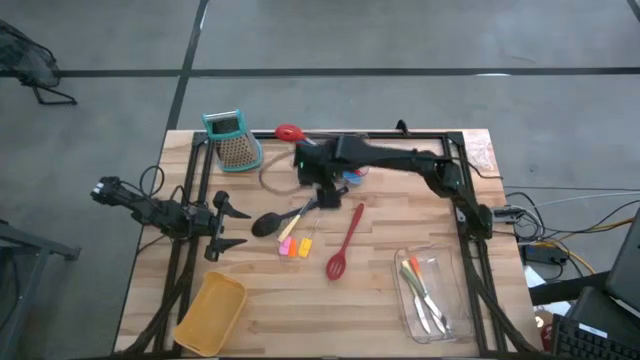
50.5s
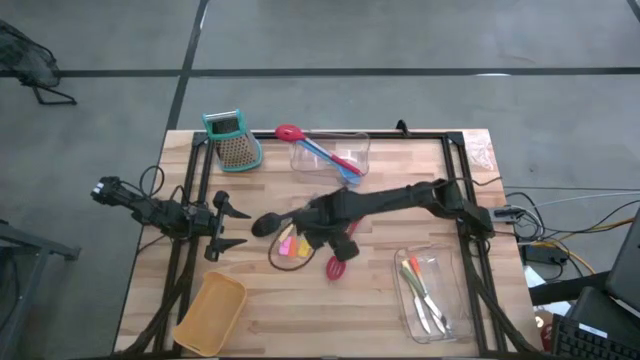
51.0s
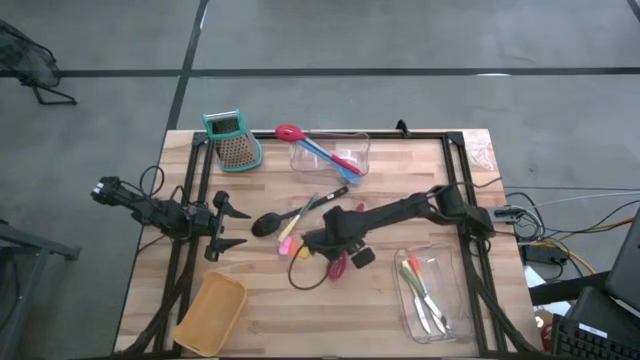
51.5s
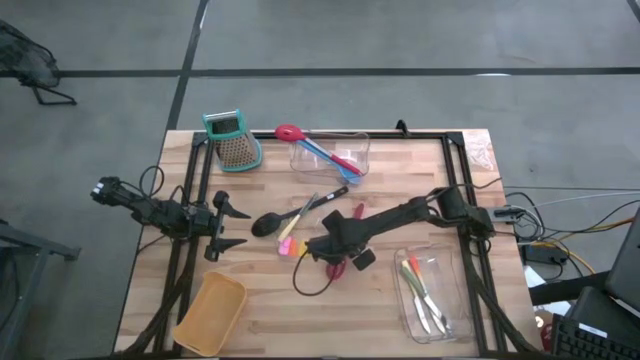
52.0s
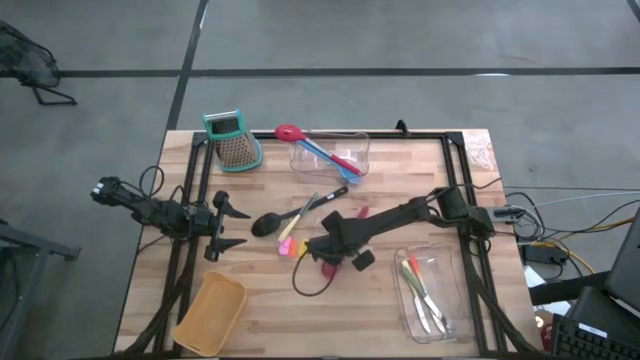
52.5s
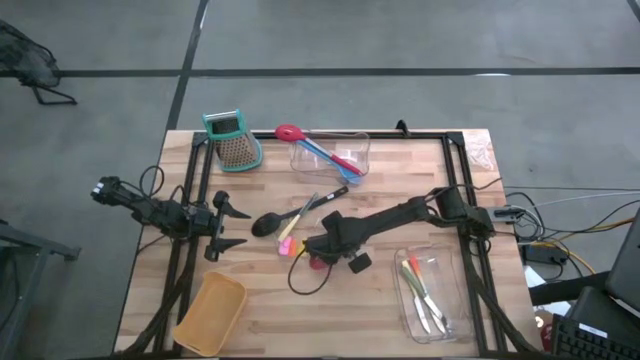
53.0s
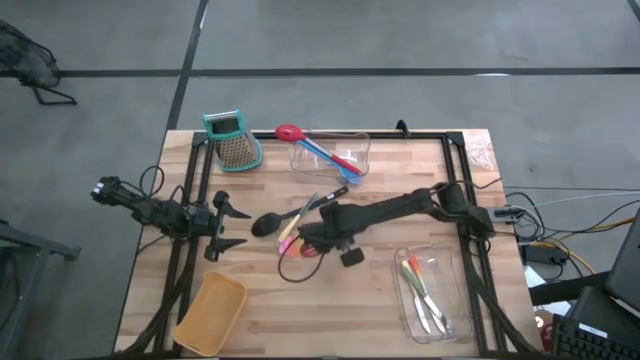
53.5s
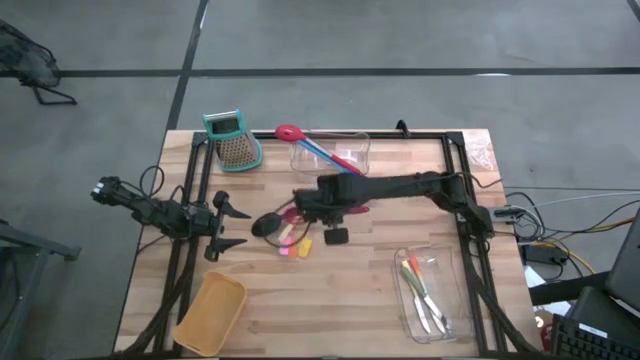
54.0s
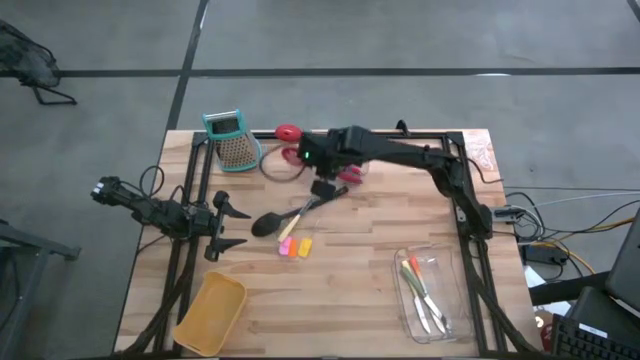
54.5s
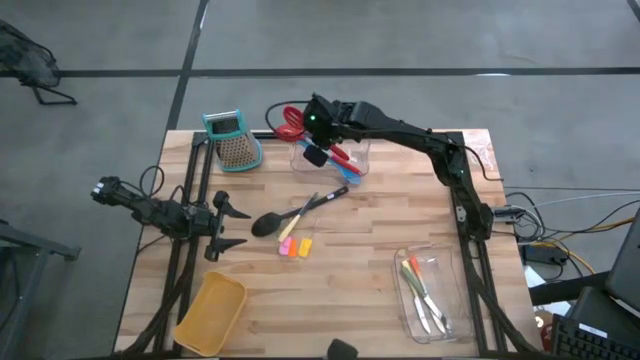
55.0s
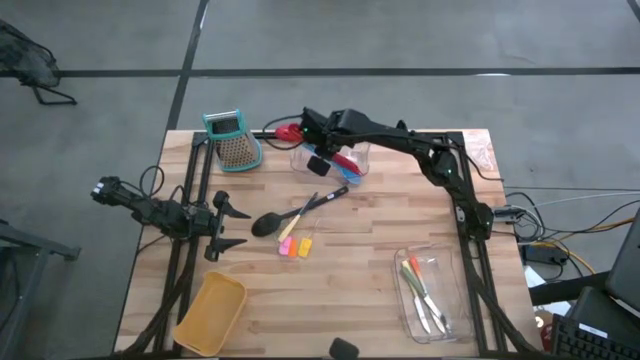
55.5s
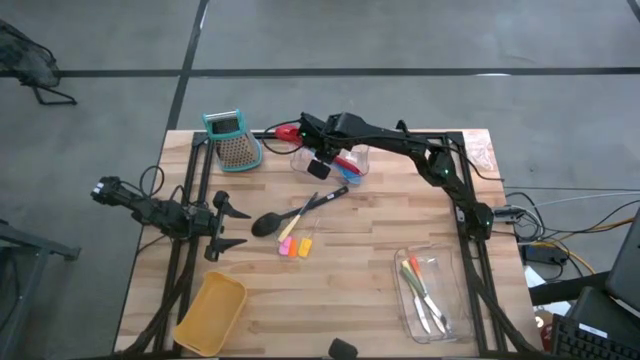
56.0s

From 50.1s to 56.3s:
Task: Pick & Place Kitchen Items
Put the red slotted spoon into the top transparent bin

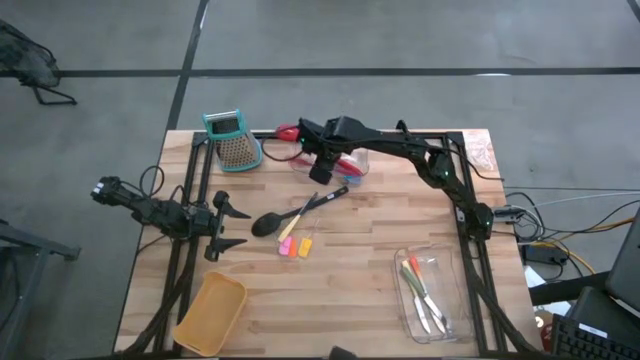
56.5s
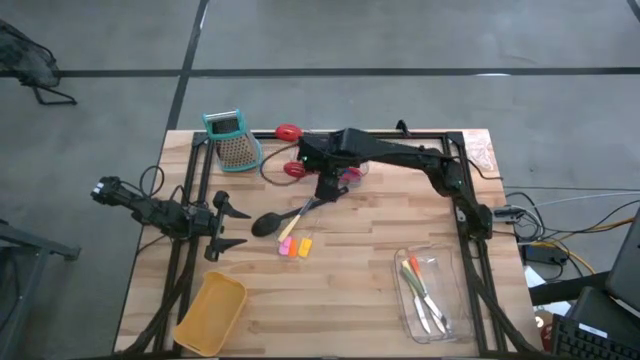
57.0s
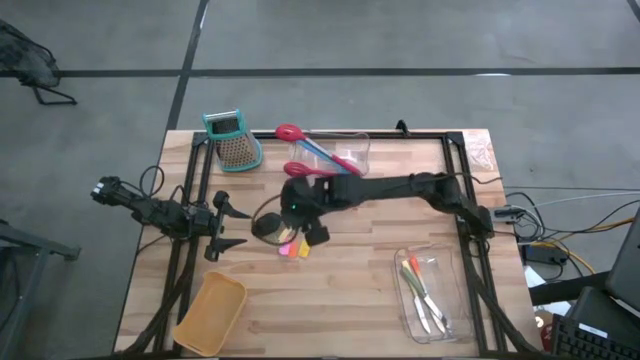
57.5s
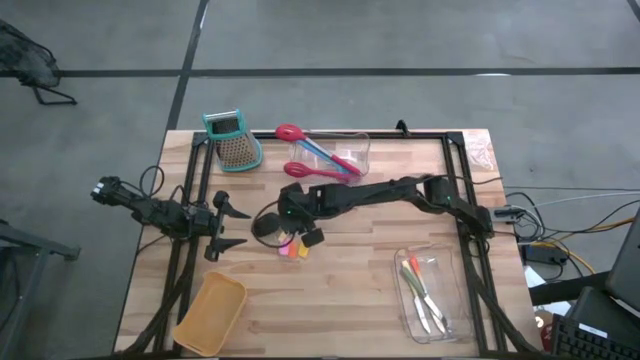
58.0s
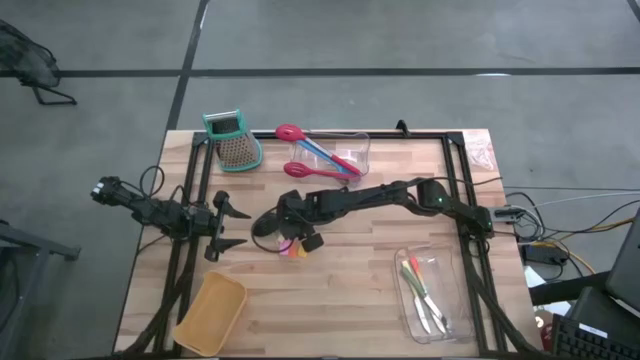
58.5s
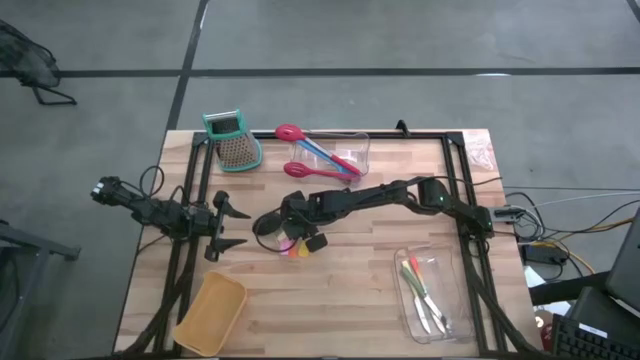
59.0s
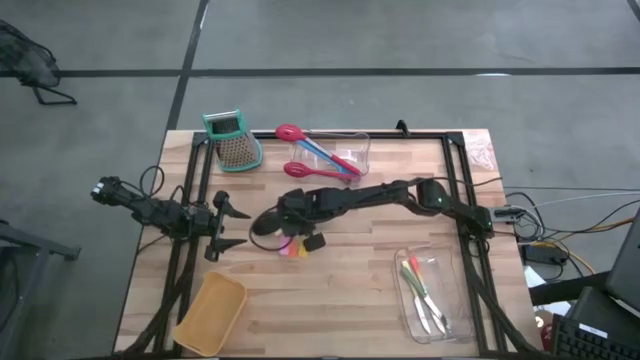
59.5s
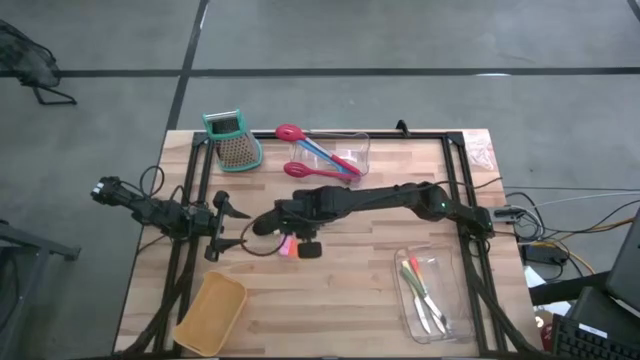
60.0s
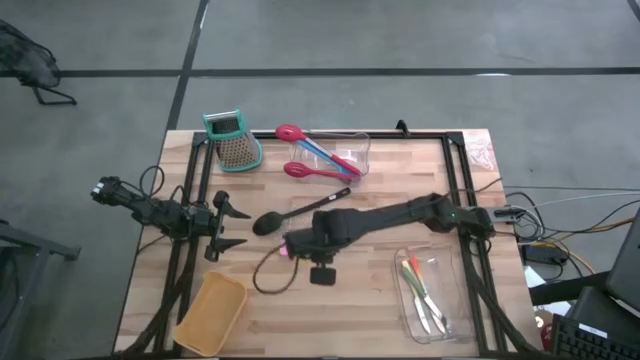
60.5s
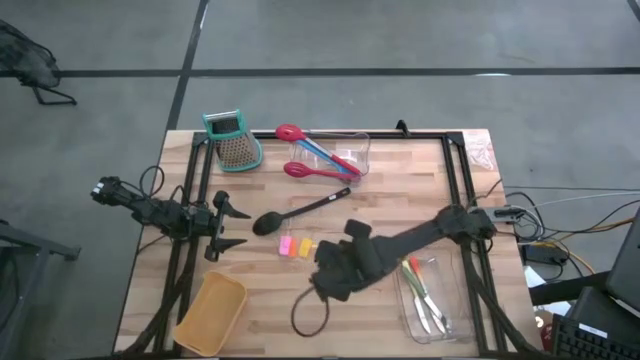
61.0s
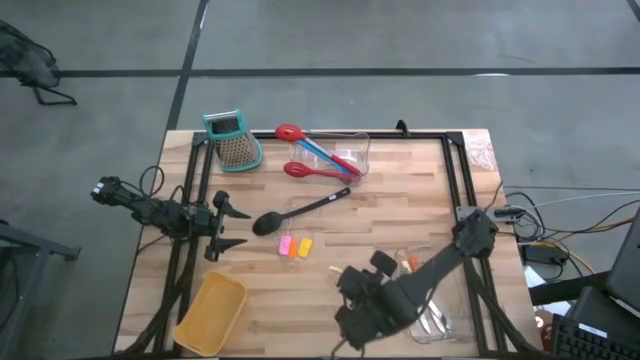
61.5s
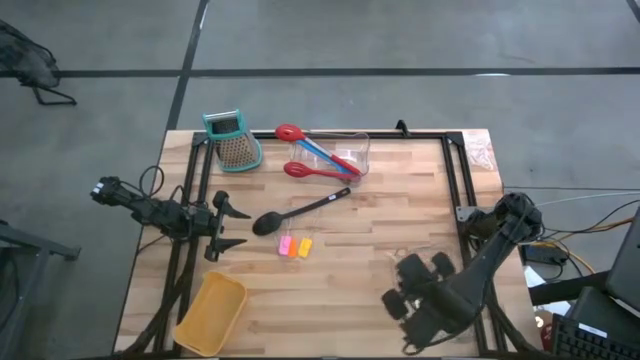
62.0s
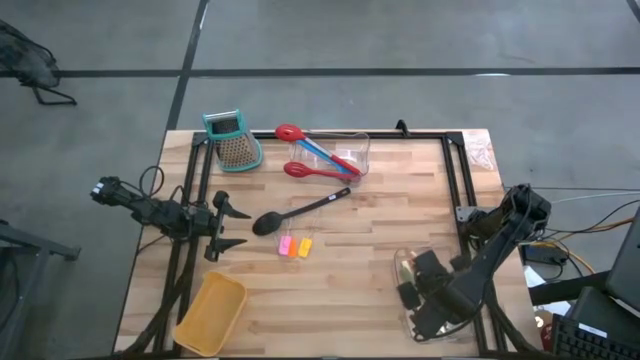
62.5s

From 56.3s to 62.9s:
Put the yellow knife into the bottom transparent bin

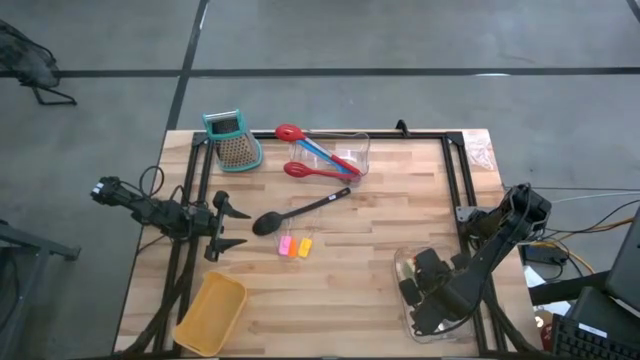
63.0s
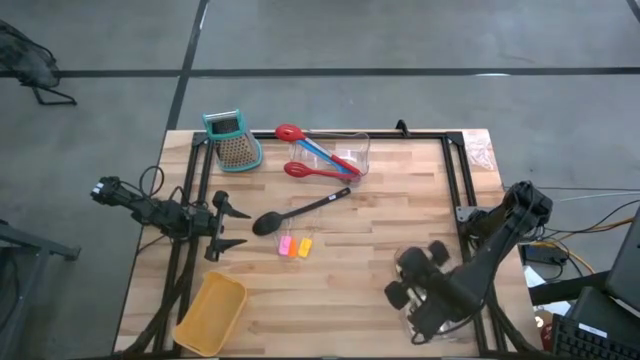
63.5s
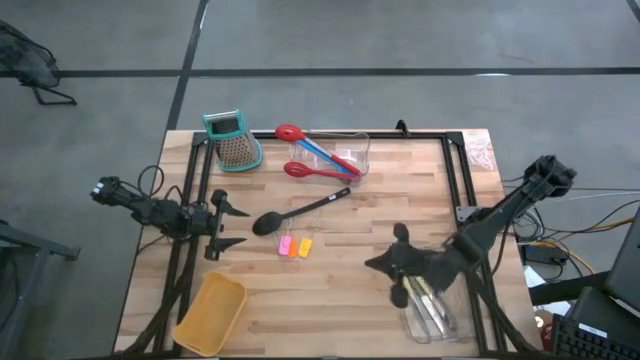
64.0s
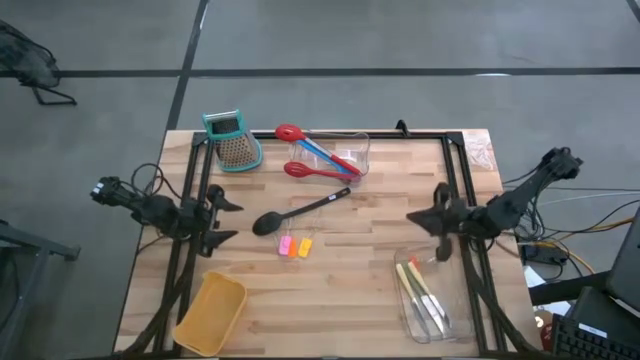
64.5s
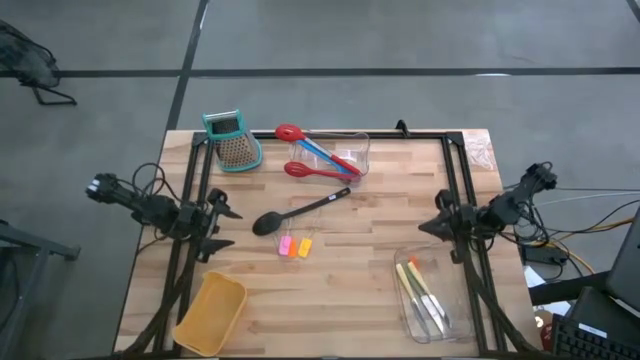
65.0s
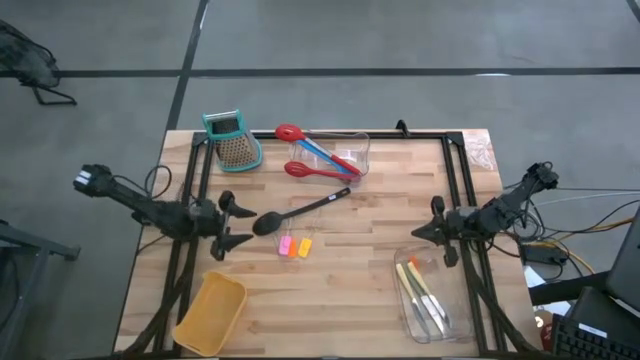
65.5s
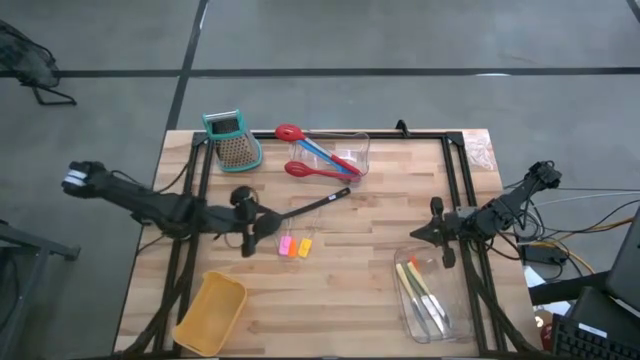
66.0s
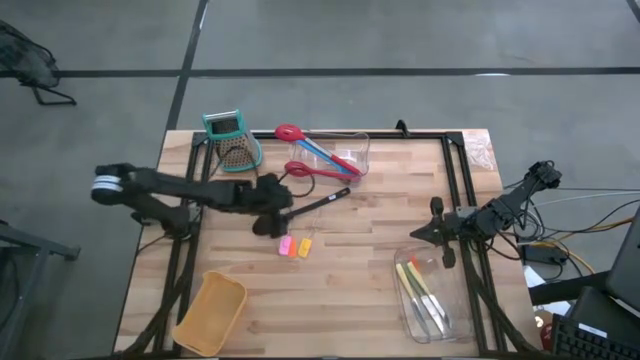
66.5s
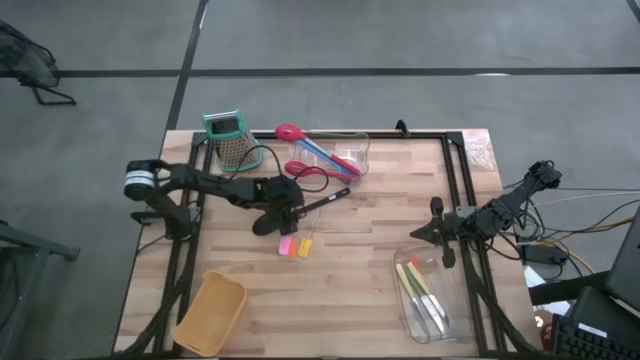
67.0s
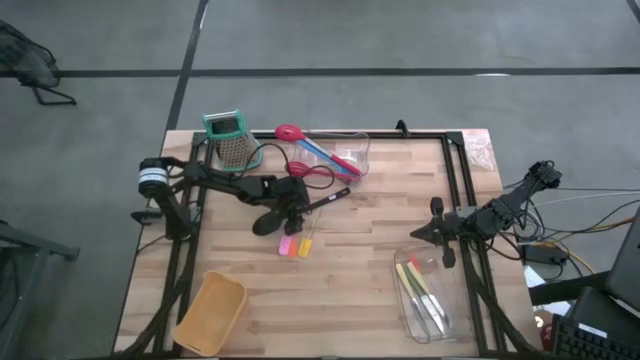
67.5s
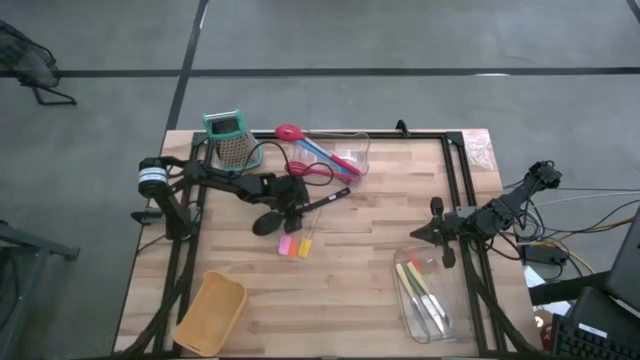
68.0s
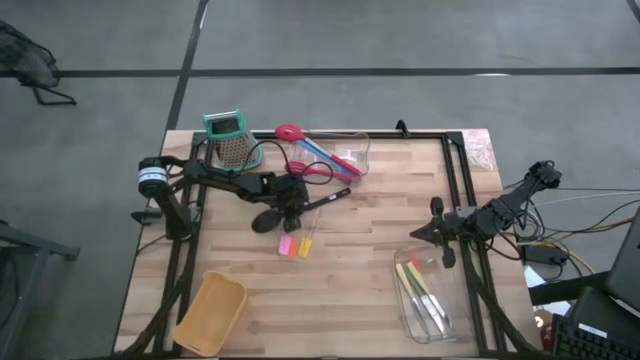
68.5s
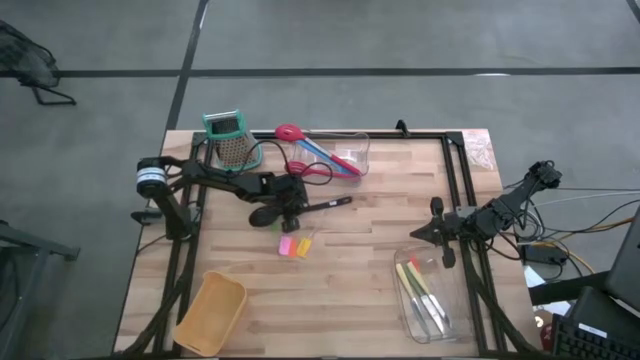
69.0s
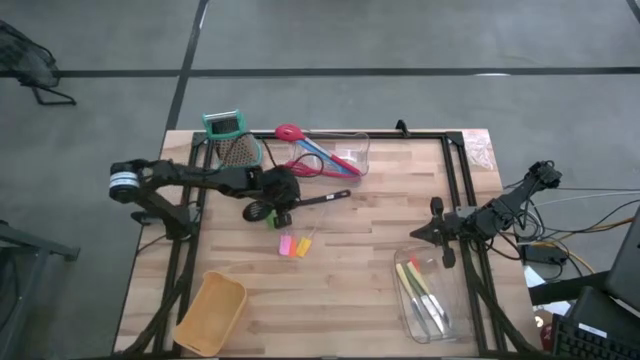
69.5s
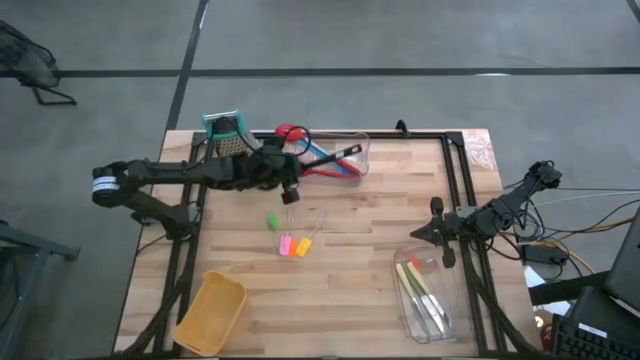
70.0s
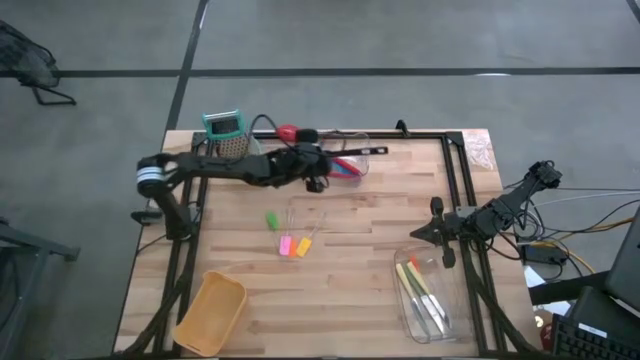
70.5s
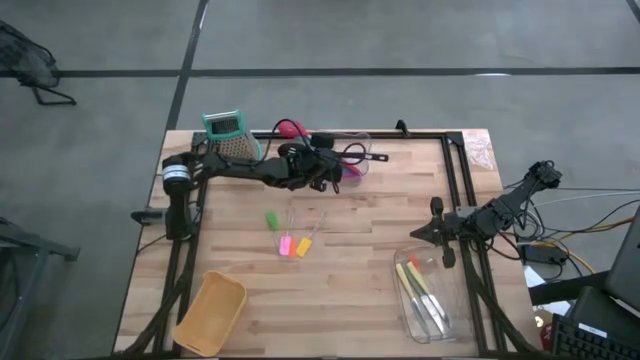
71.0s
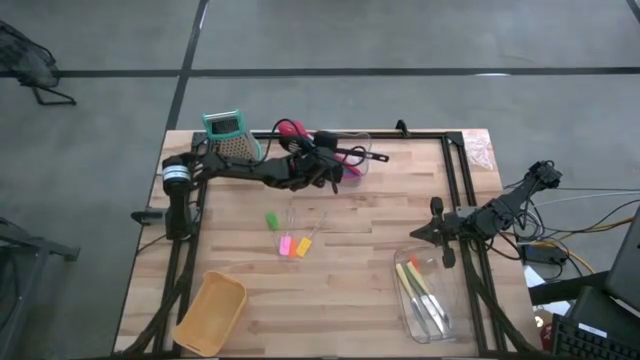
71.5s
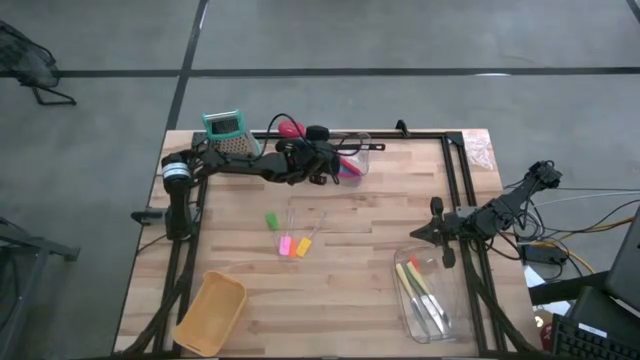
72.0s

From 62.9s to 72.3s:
Put the black slotted spoon into the top transparent bin
